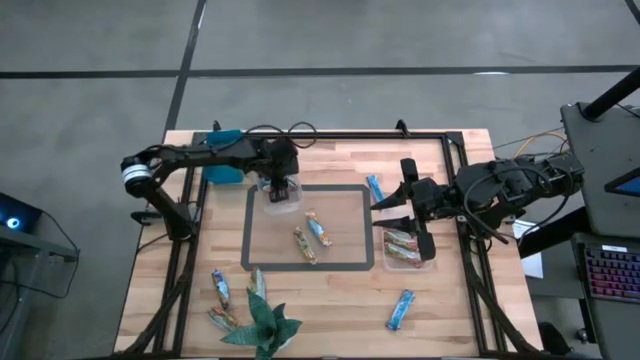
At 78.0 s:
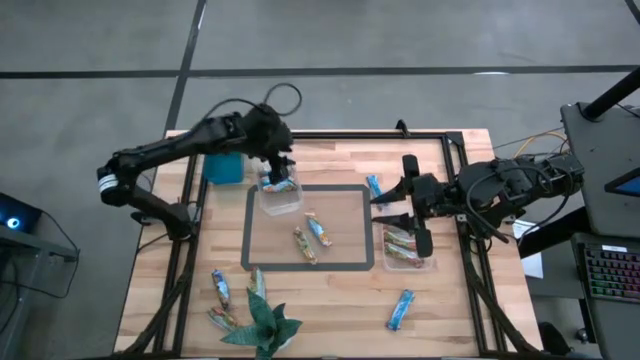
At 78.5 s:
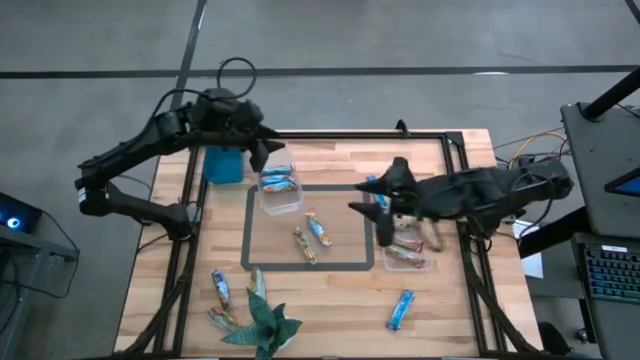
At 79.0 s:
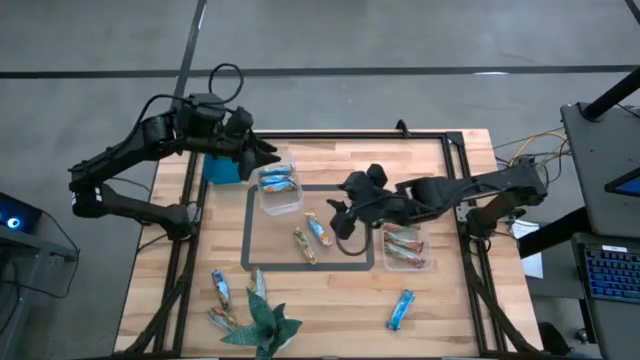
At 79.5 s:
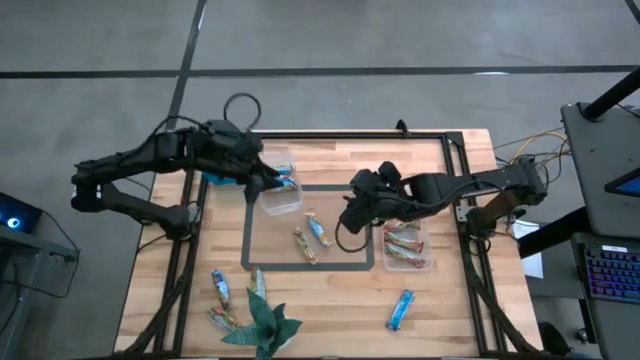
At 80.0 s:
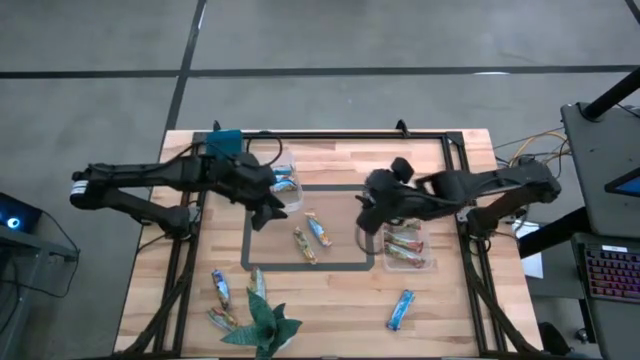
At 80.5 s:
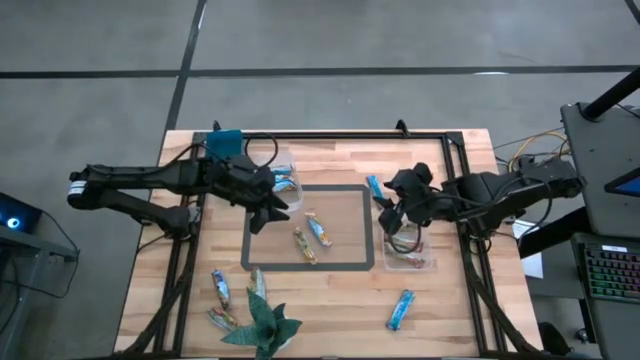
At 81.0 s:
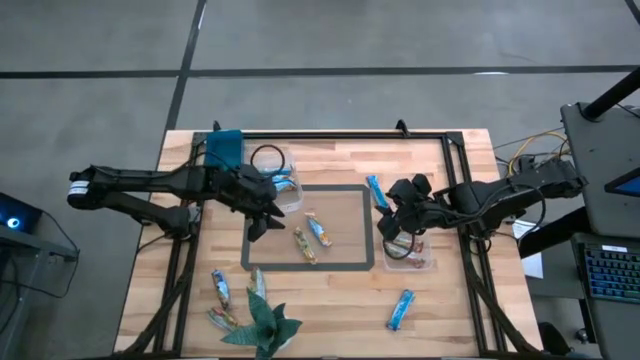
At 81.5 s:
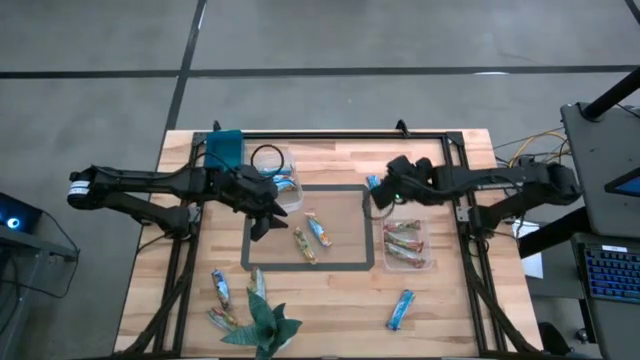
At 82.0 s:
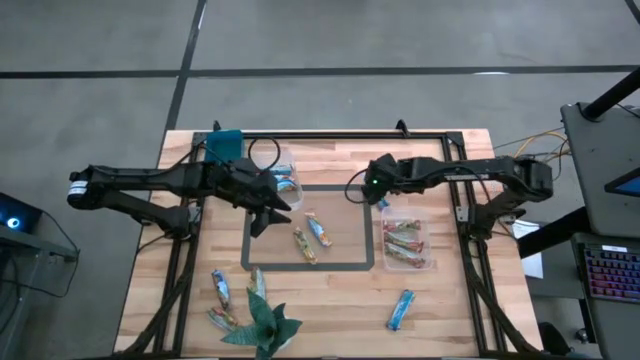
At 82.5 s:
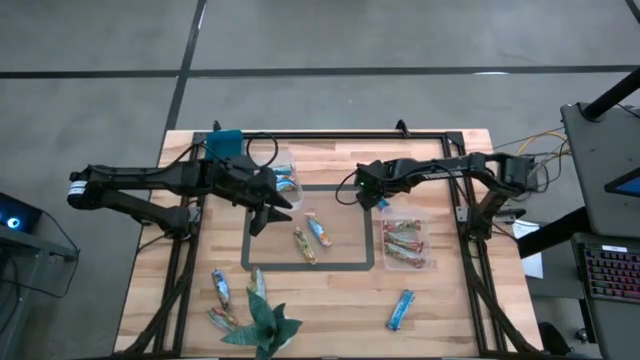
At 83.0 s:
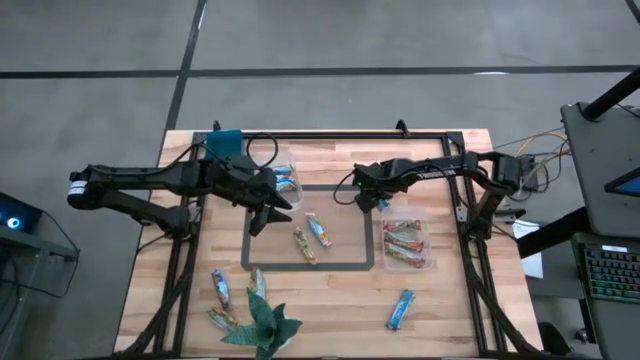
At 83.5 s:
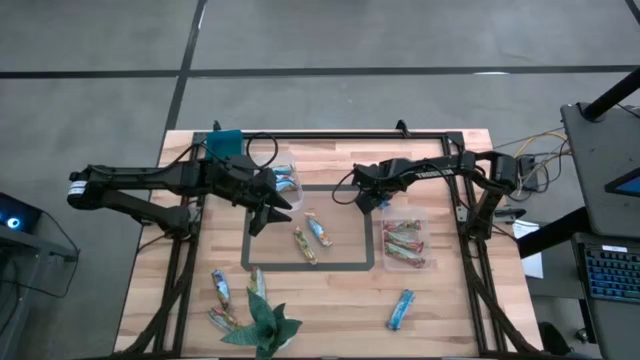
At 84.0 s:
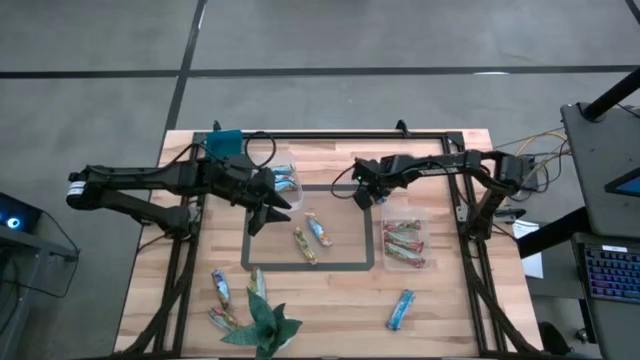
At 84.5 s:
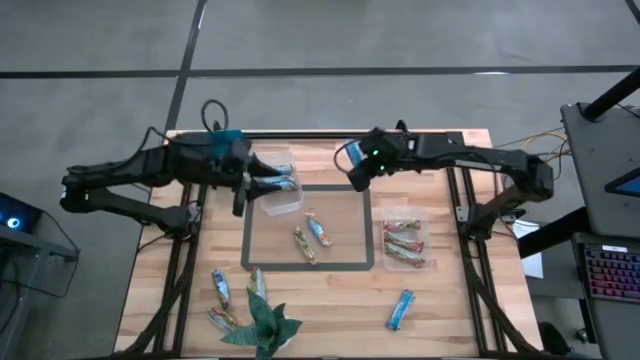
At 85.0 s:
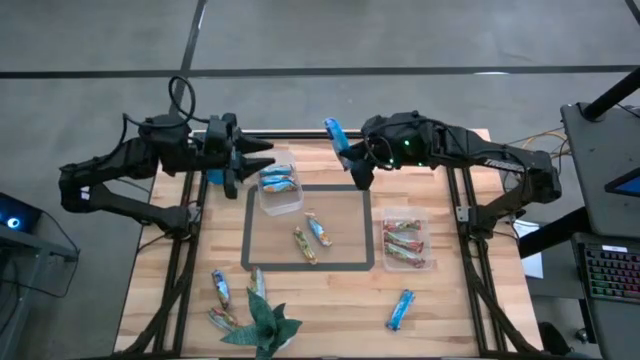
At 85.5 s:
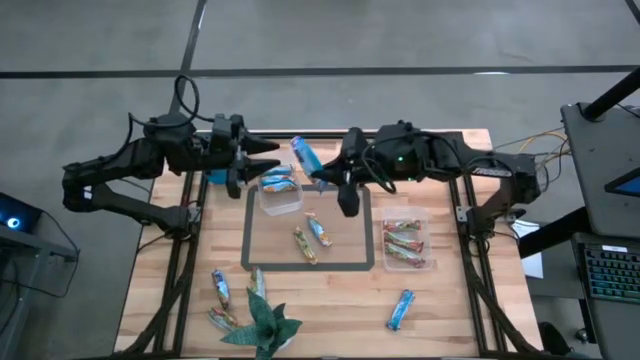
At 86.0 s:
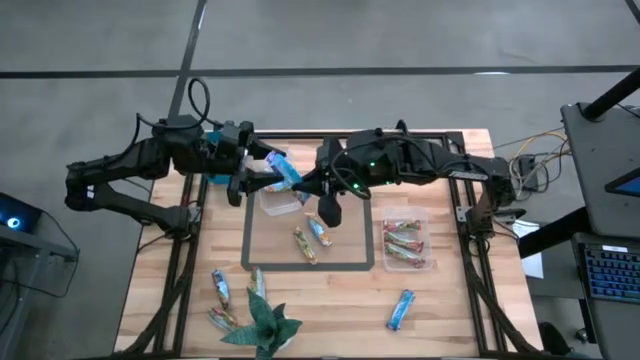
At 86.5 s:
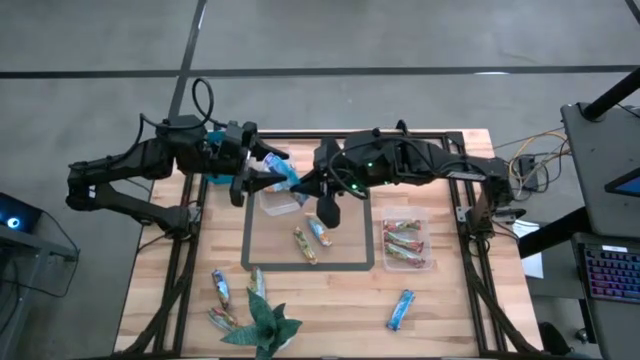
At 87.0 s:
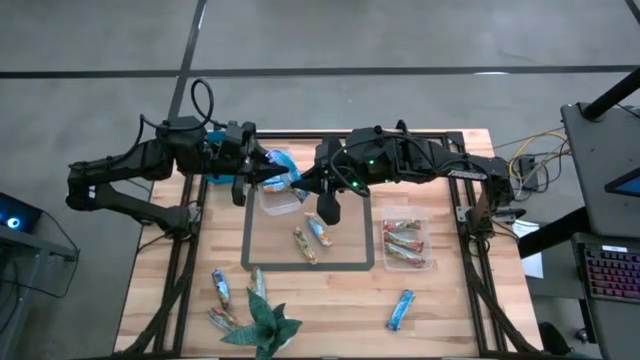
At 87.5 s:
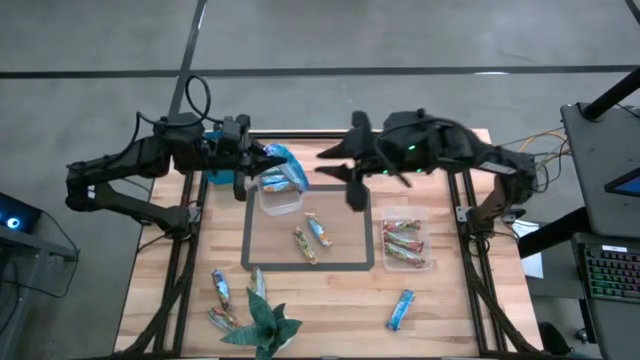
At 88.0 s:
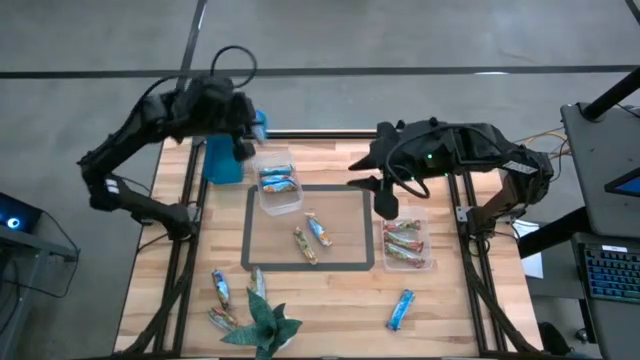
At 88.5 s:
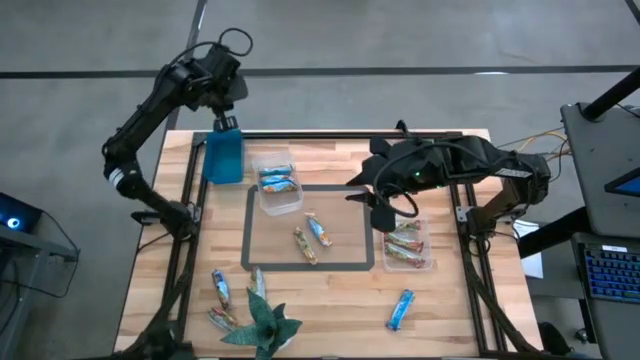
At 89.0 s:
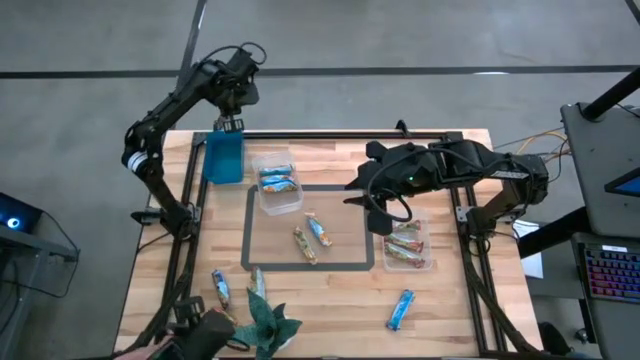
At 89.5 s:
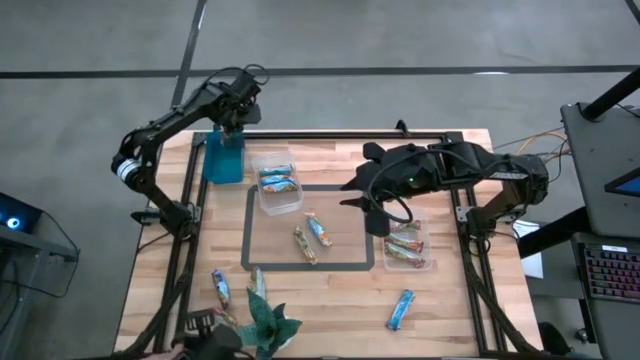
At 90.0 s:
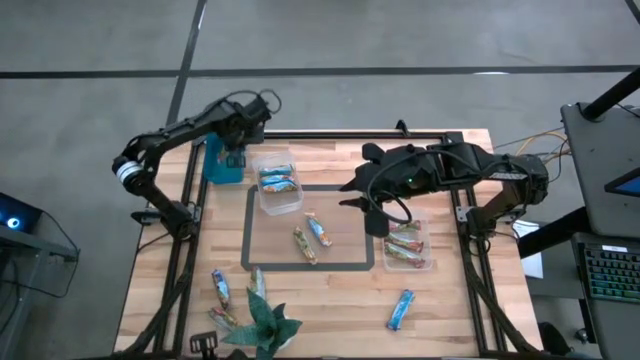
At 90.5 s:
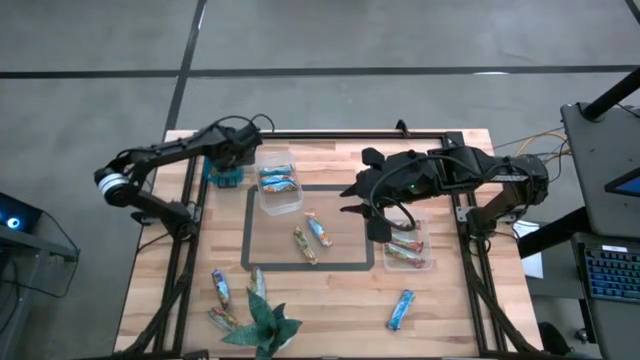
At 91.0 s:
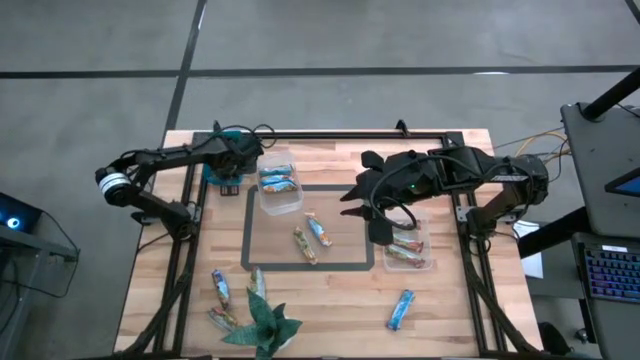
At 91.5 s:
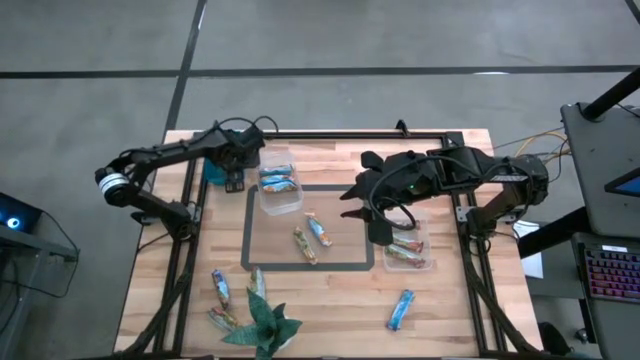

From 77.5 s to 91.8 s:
Task: Pick and place Granola Bars by type
Put the blue granola bar into the blue bin

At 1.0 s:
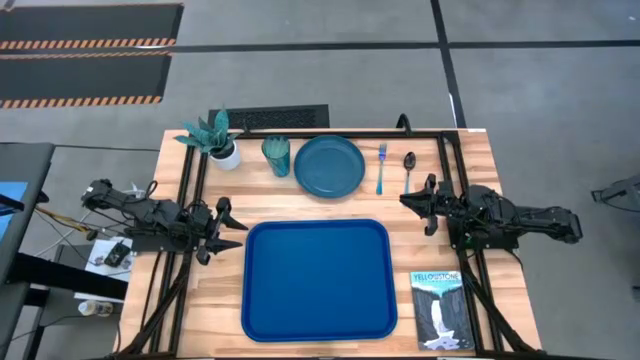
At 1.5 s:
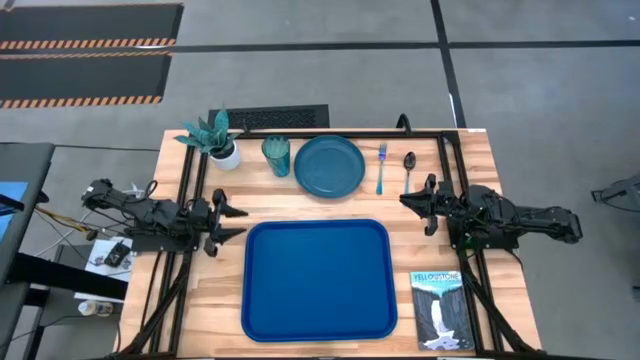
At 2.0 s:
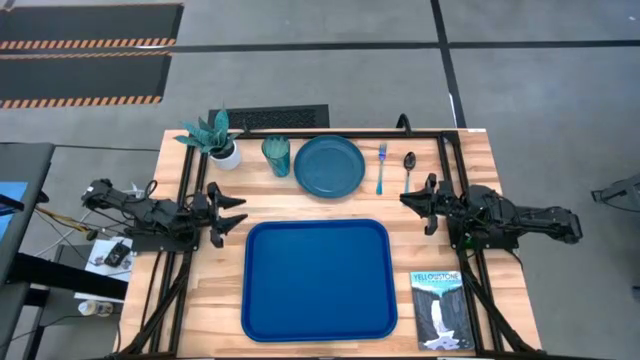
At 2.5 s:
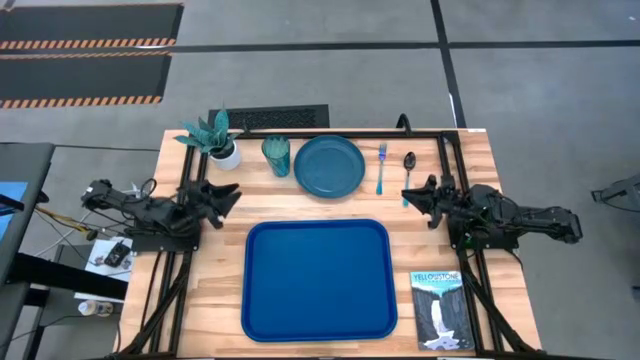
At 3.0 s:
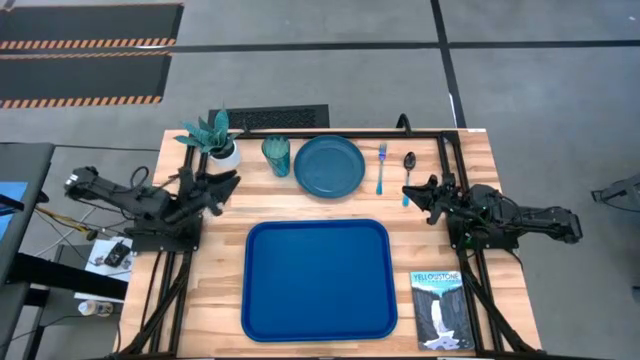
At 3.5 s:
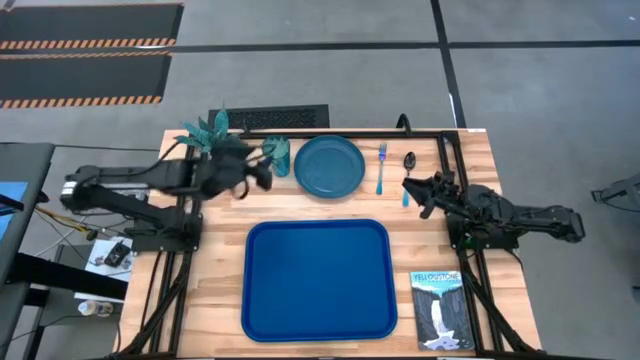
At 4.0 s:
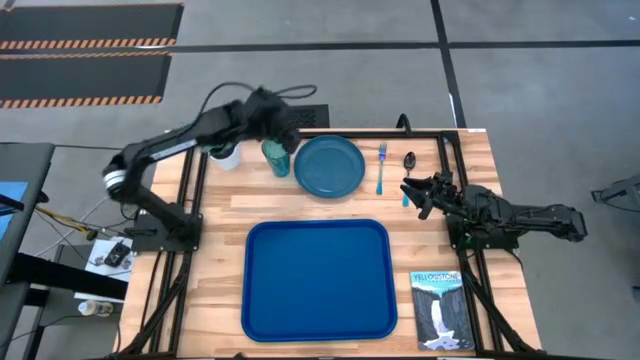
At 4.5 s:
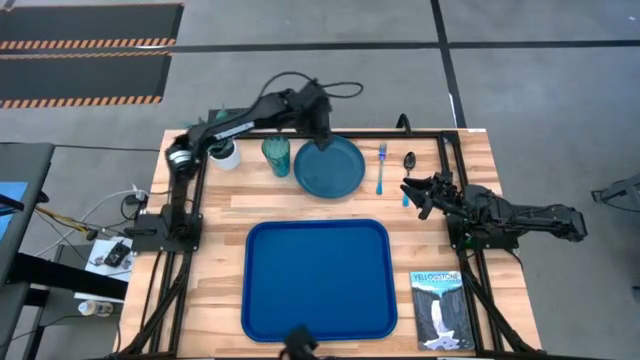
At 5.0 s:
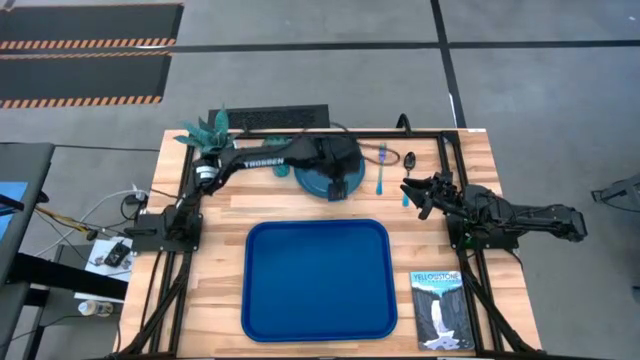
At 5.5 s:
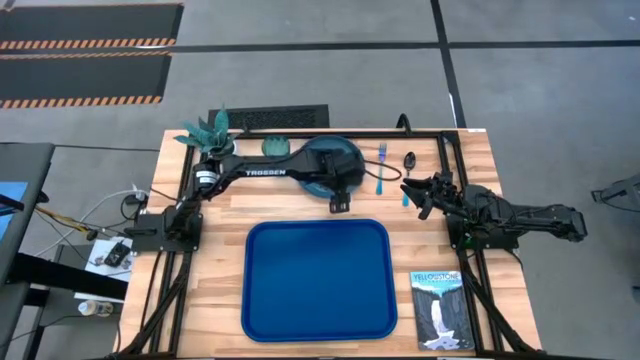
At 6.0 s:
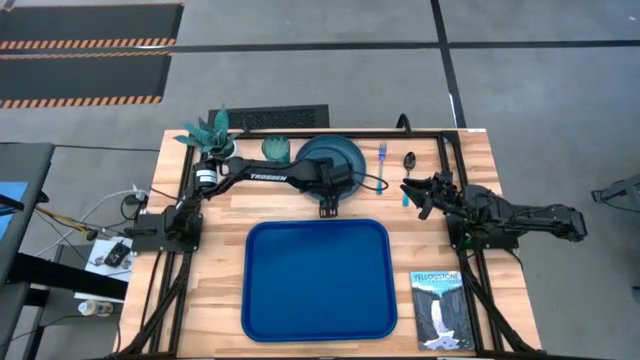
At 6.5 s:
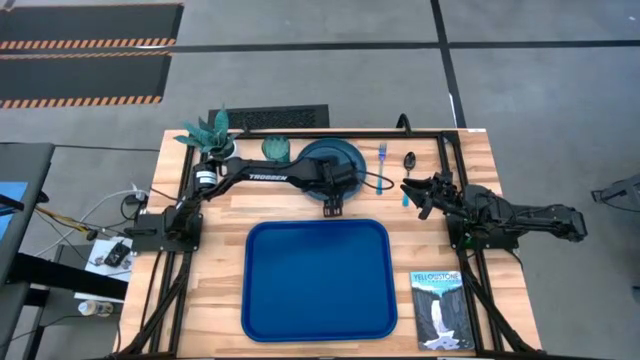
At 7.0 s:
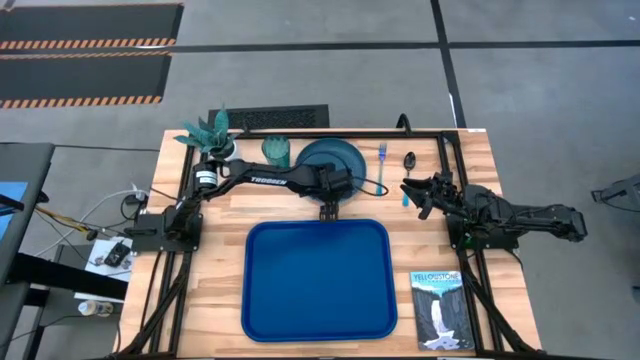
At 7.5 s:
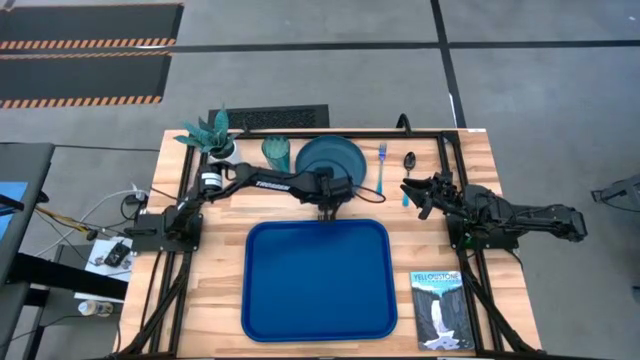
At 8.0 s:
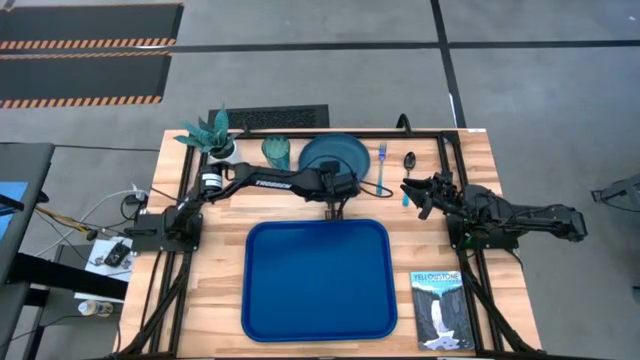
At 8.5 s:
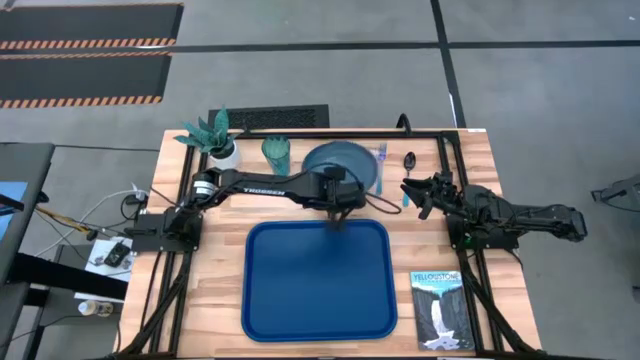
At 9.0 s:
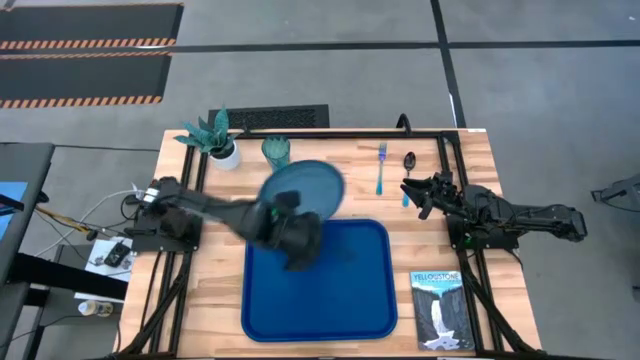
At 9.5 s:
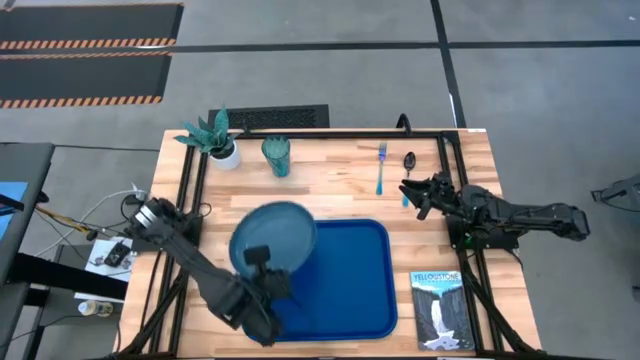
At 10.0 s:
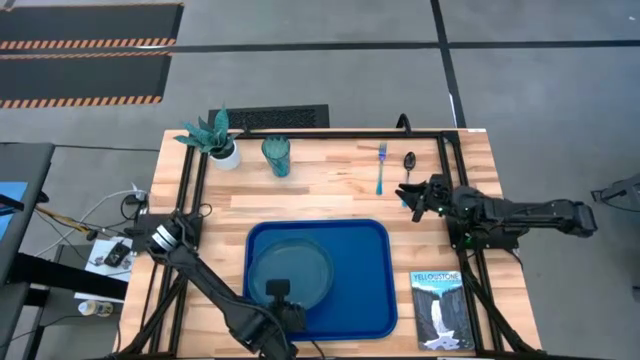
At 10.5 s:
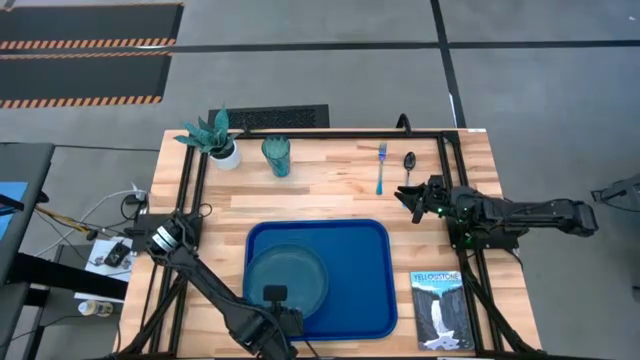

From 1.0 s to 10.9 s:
Task: Pick and place plate/cup/fork/spoon on tray
Put the blue plate on the left of the blue serving tray
